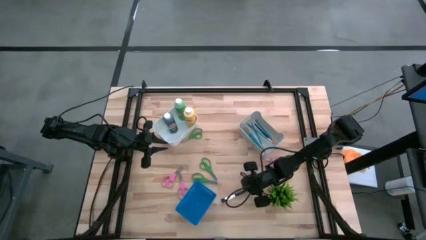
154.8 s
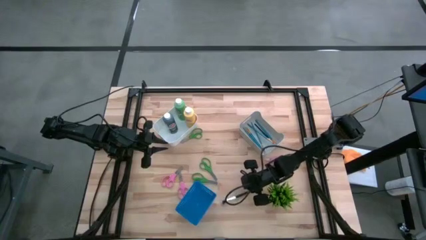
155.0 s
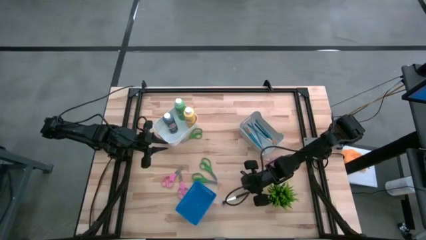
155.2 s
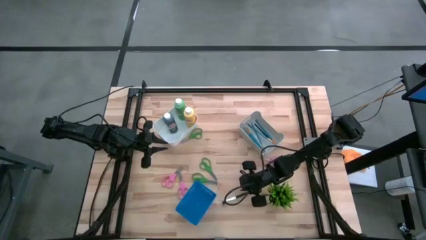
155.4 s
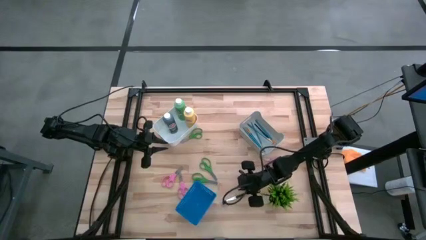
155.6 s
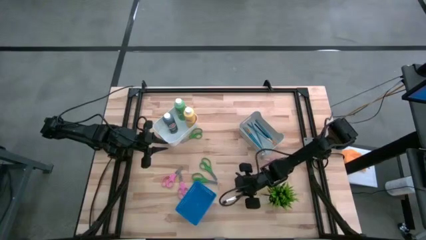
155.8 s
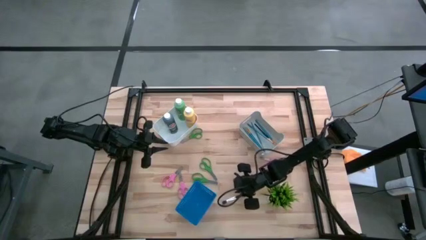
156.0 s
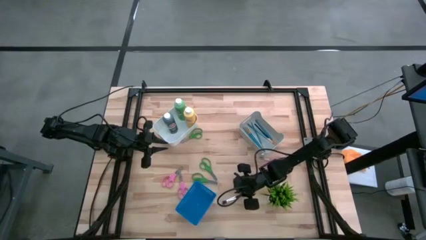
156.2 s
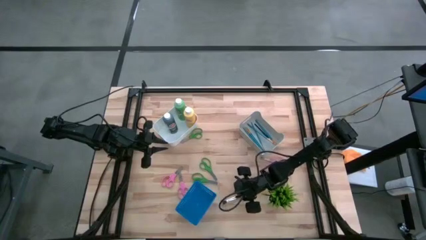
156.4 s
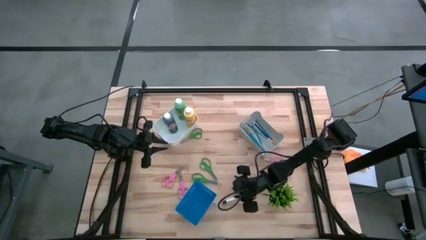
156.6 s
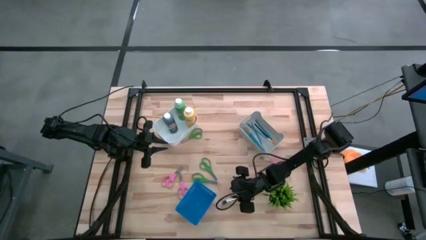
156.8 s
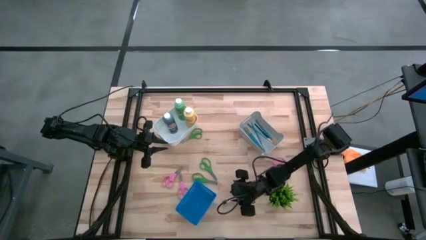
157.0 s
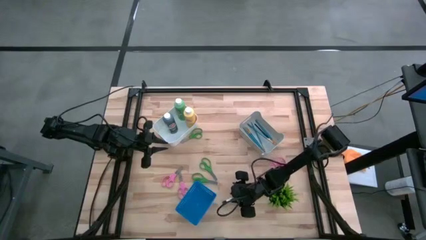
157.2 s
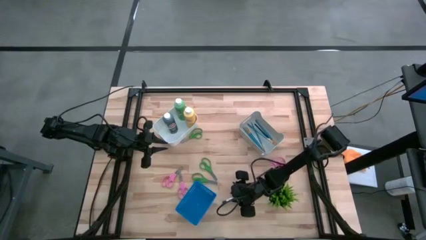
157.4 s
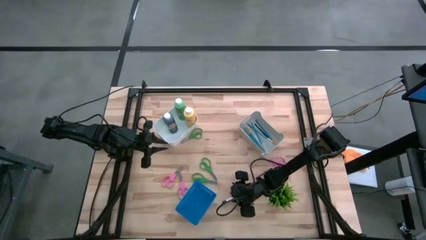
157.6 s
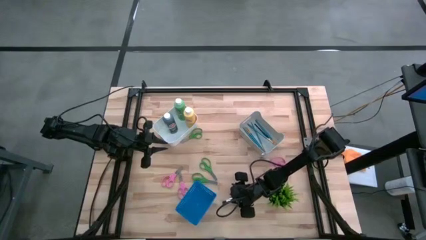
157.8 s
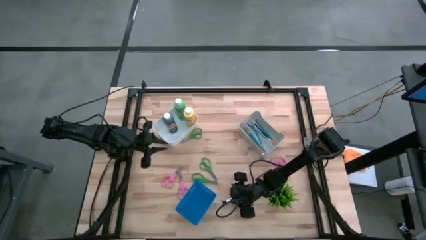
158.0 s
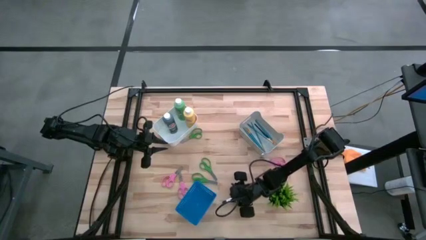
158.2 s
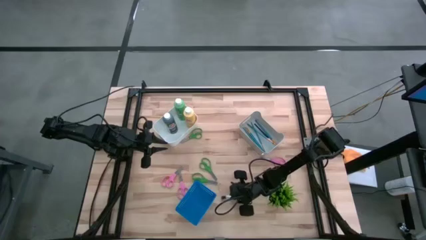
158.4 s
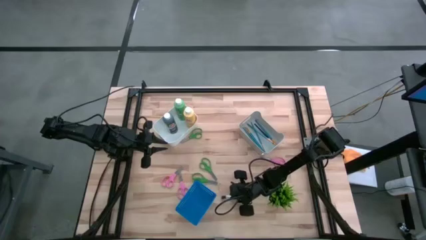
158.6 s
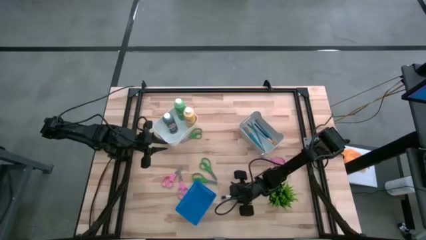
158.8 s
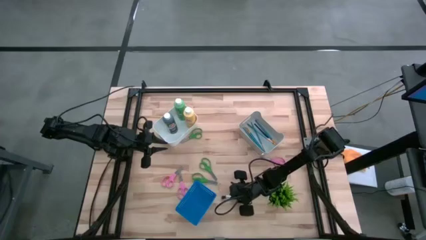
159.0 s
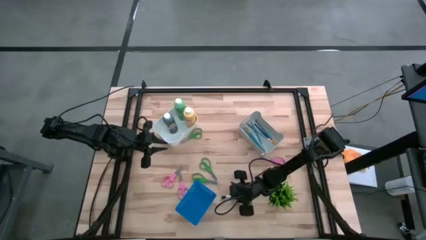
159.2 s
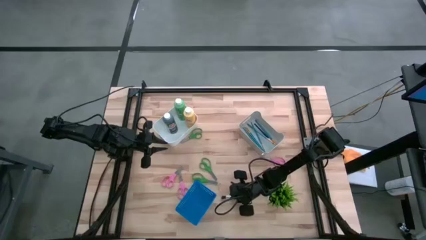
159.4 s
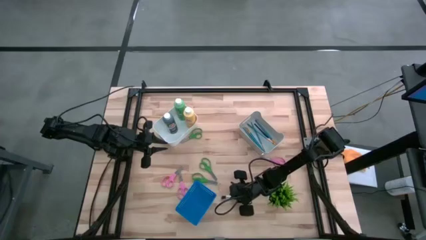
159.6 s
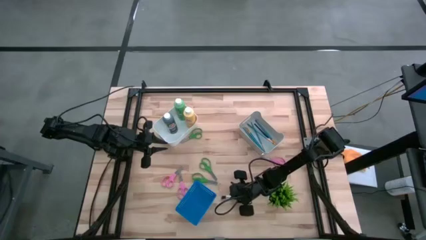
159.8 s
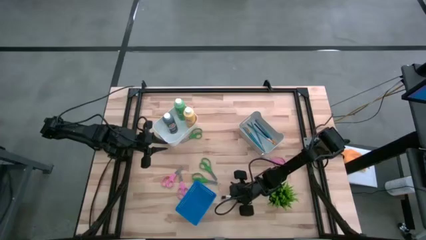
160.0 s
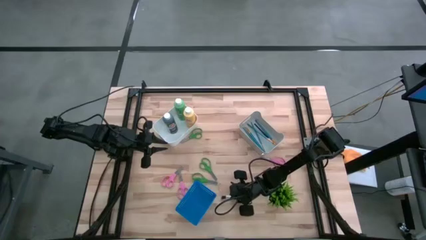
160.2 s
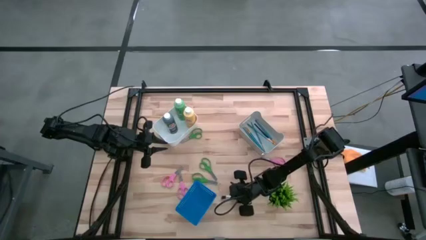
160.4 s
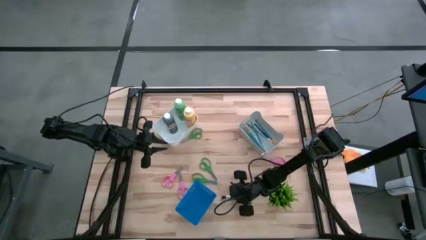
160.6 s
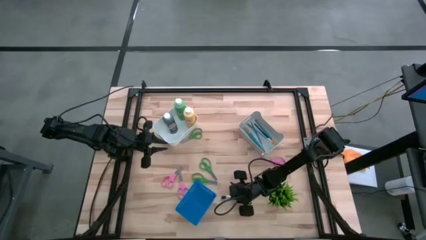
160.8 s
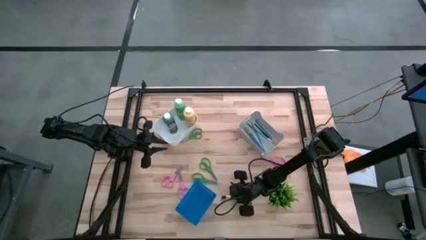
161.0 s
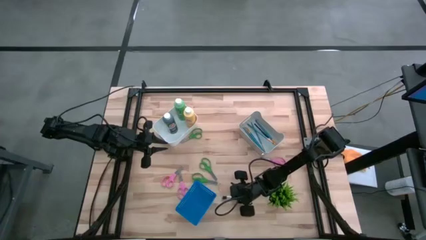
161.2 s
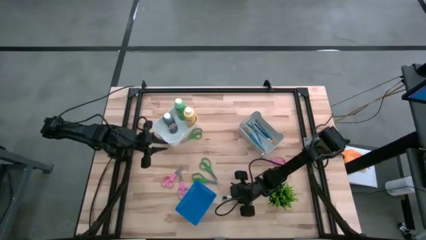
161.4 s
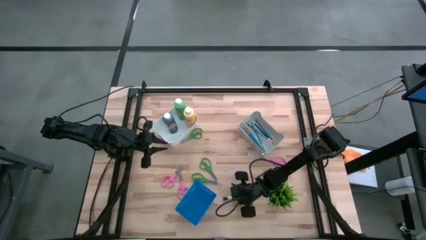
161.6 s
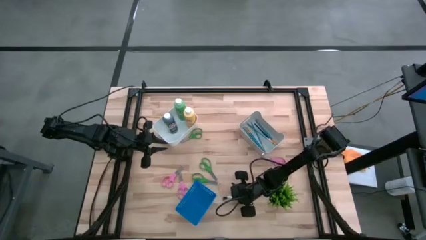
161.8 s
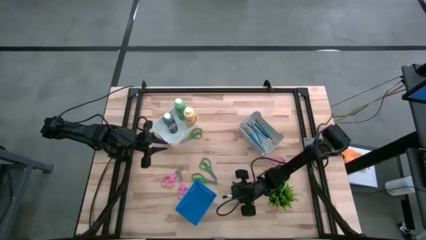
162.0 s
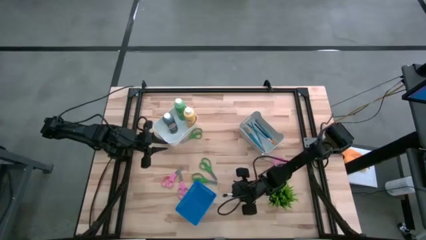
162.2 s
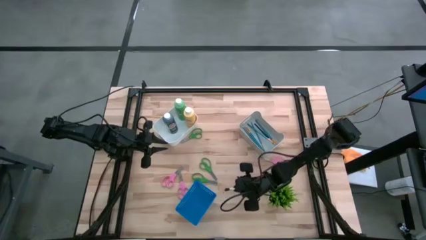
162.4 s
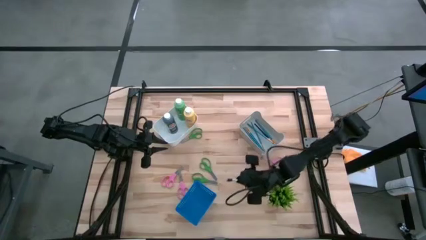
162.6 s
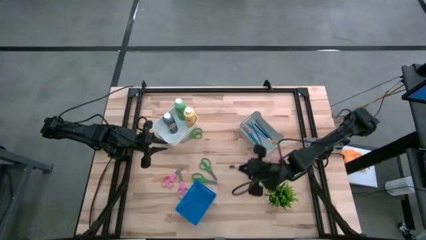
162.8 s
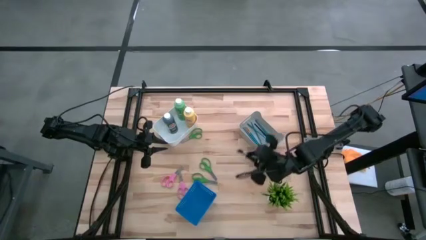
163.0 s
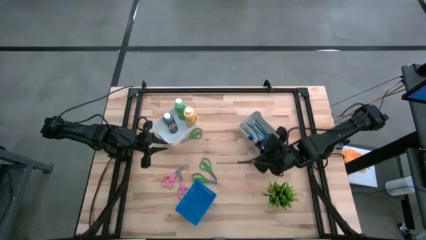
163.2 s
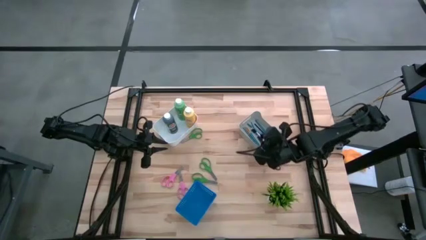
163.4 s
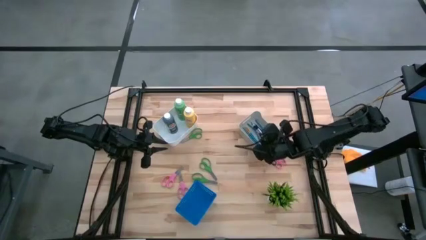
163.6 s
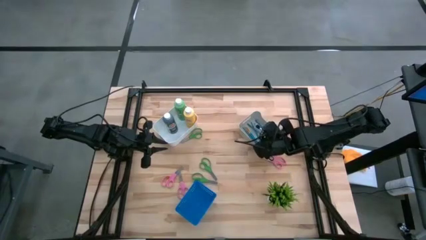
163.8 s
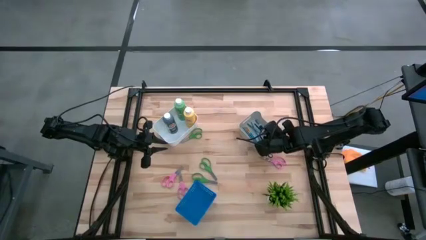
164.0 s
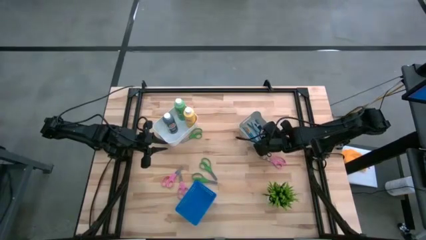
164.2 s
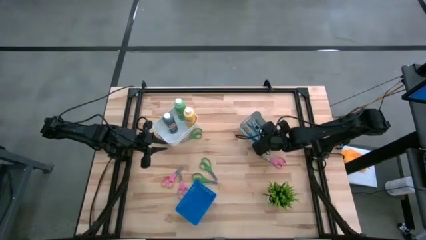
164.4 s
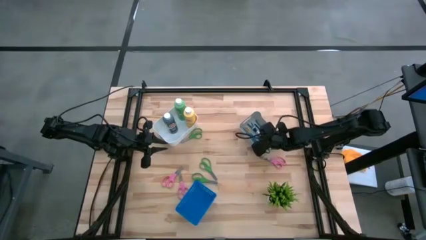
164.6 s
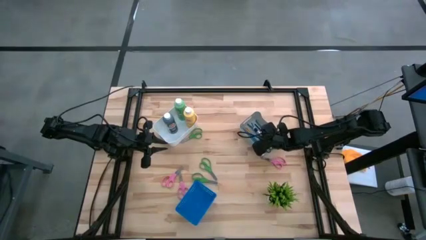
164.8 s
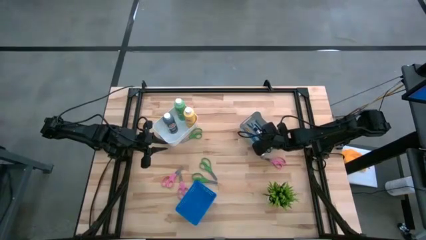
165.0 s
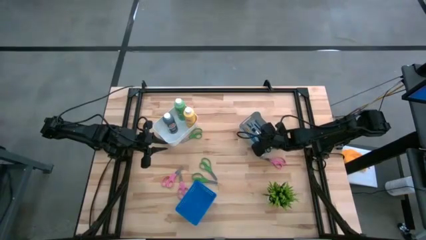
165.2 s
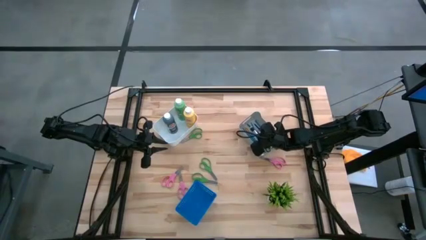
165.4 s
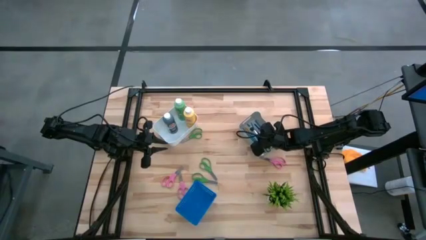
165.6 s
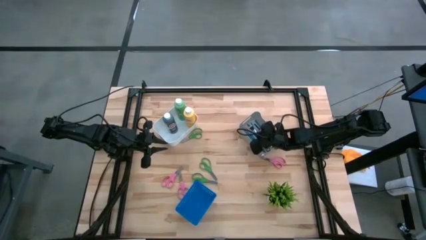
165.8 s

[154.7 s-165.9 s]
Task: Pick & Place Paint Supplies
Put the black paintbrush into the gray bin

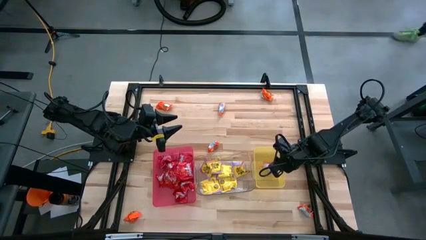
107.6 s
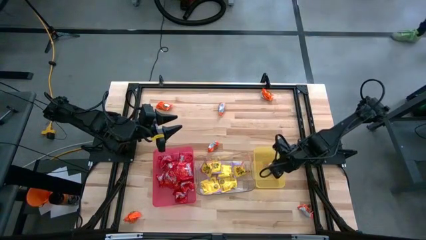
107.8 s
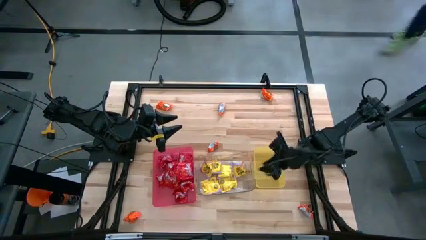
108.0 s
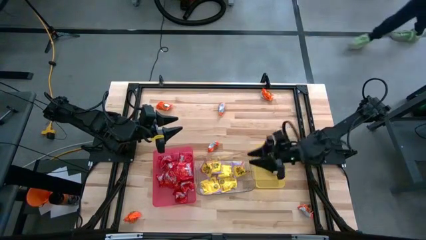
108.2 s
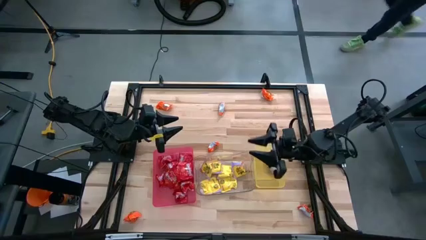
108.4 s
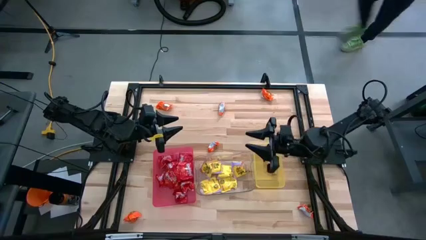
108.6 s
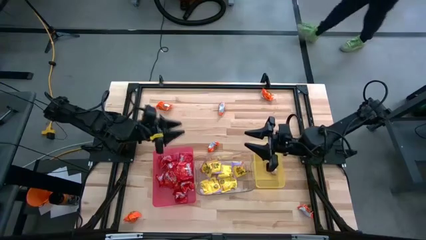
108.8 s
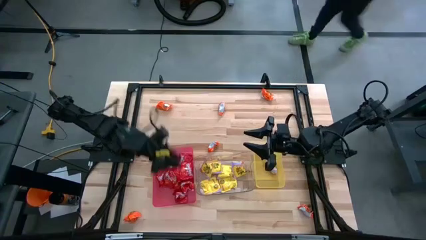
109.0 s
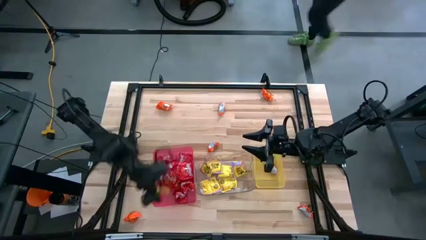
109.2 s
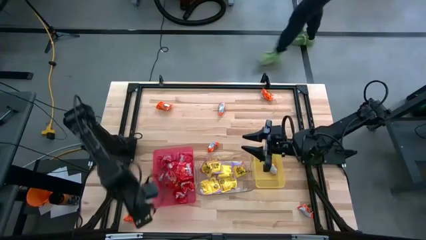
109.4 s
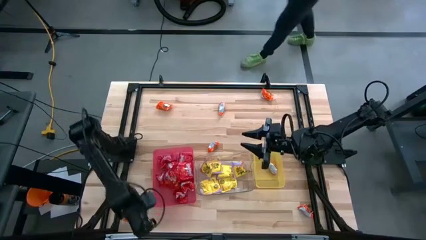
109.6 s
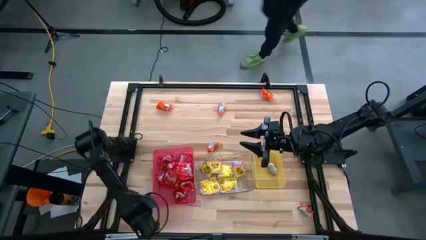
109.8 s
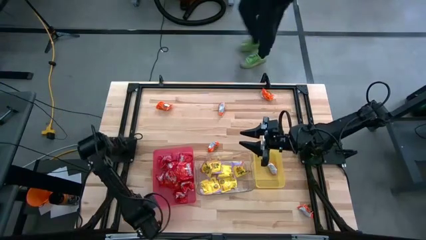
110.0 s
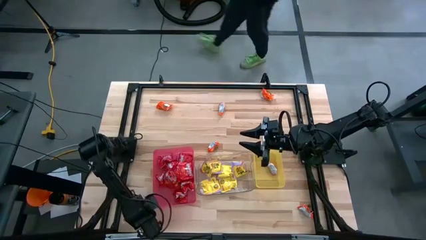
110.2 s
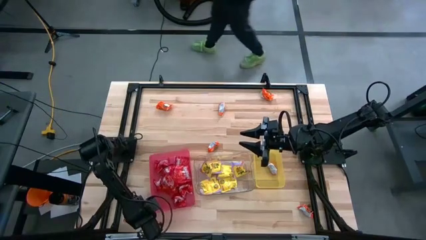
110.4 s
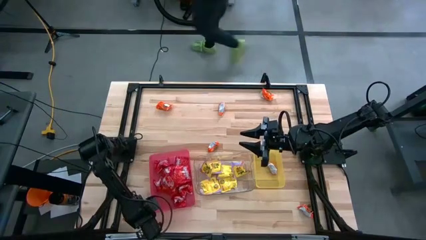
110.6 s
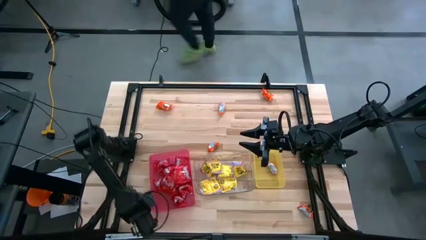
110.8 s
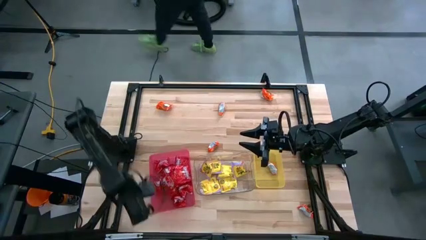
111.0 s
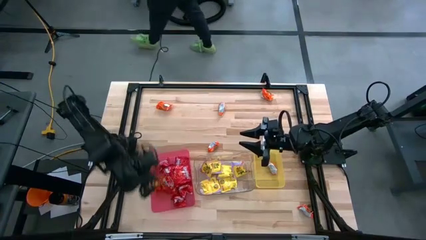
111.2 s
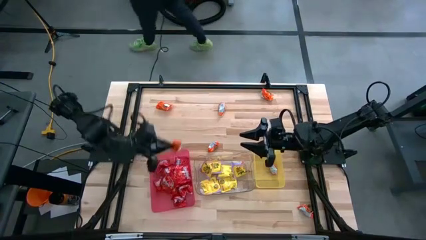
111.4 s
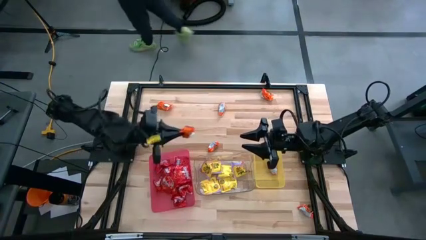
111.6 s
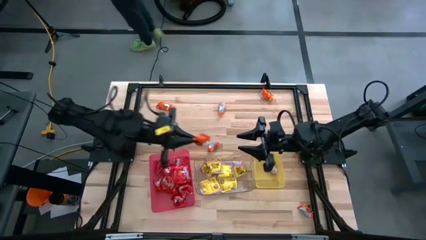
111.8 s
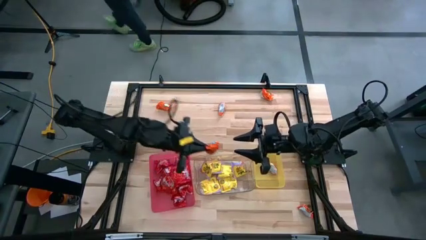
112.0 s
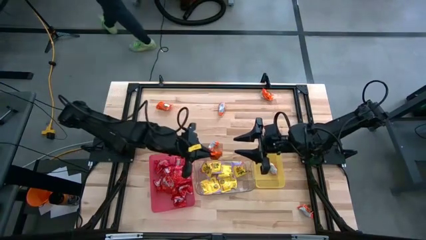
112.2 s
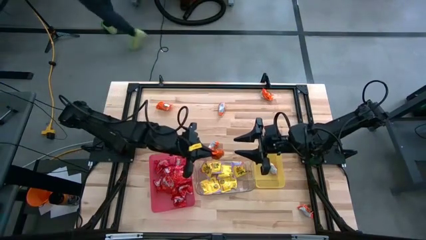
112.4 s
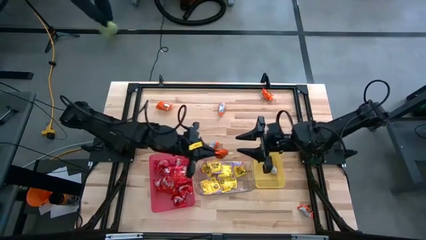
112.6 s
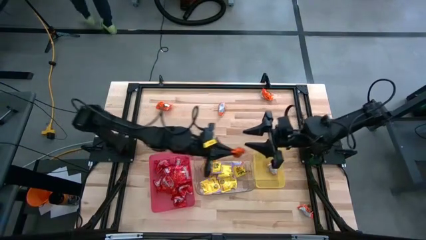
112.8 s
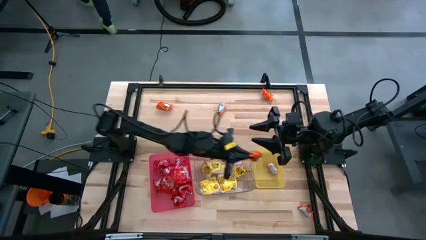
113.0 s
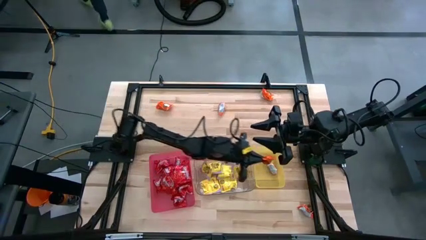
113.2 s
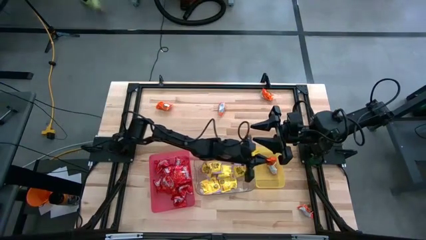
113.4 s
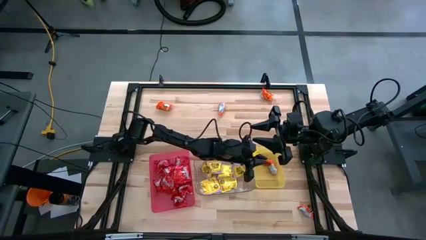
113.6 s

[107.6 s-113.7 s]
Task: Sort candy
Put the orange chocolate into the yellow bin
